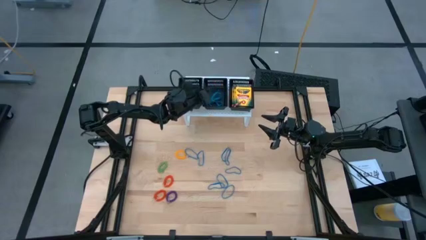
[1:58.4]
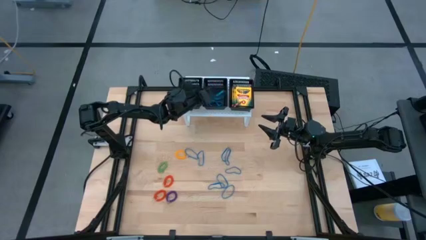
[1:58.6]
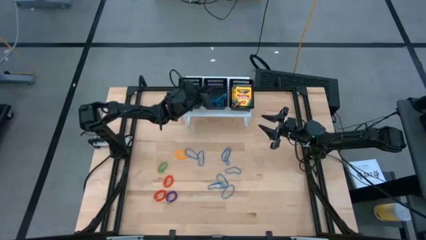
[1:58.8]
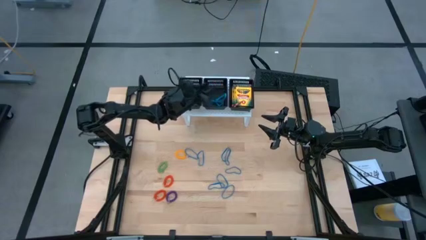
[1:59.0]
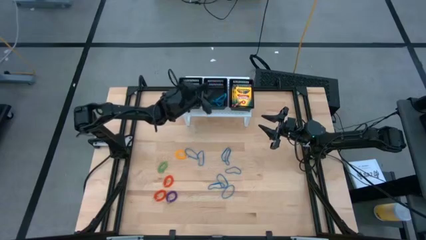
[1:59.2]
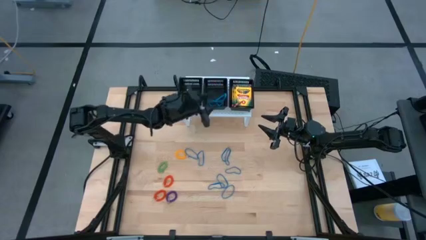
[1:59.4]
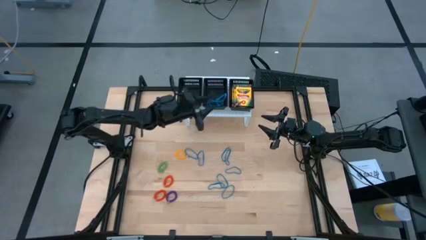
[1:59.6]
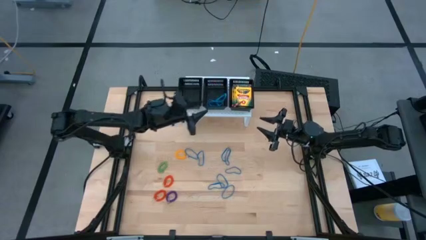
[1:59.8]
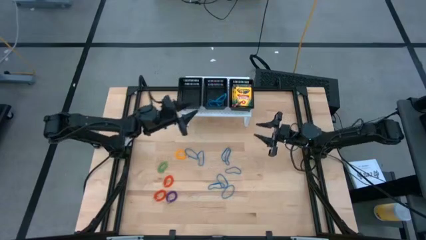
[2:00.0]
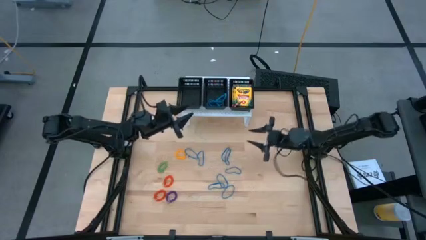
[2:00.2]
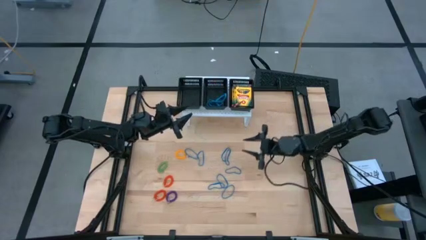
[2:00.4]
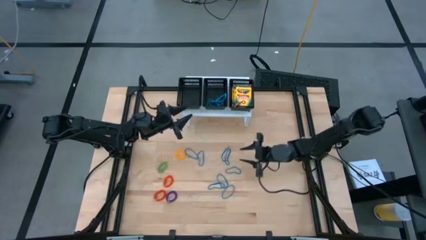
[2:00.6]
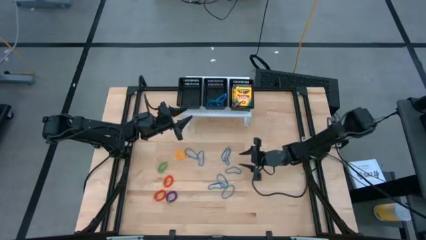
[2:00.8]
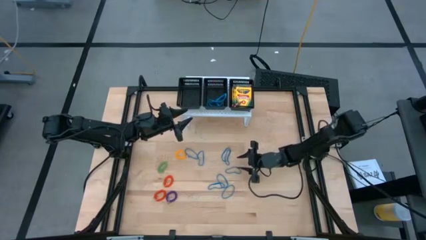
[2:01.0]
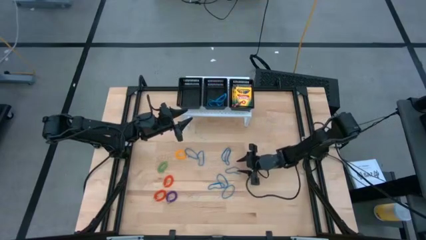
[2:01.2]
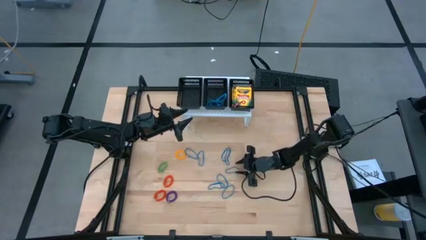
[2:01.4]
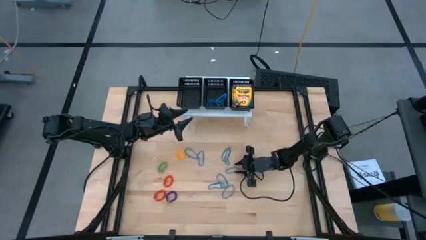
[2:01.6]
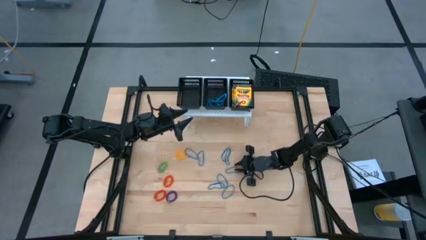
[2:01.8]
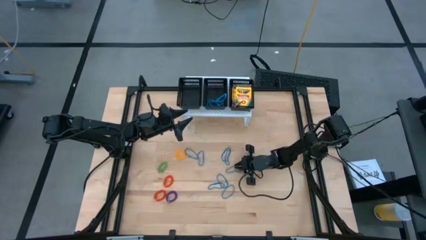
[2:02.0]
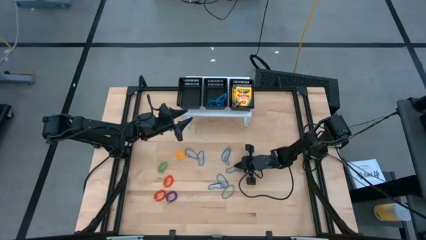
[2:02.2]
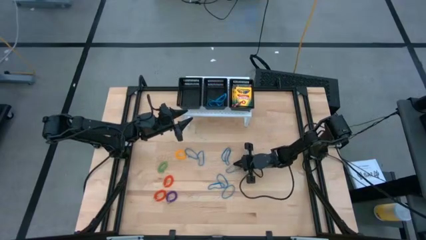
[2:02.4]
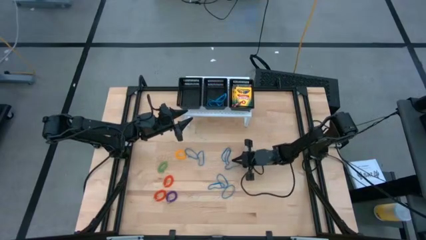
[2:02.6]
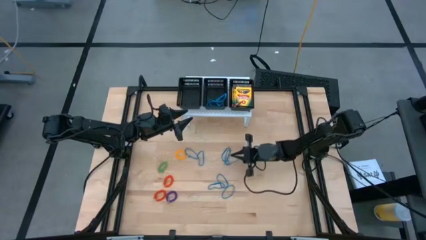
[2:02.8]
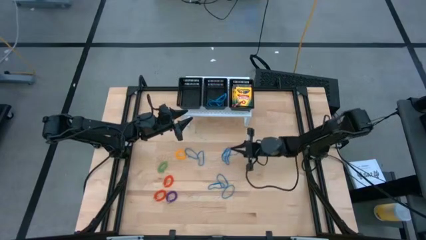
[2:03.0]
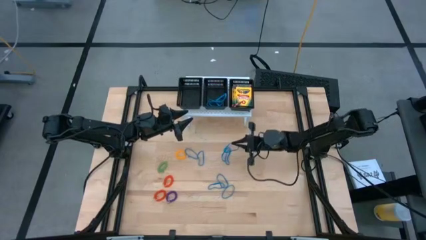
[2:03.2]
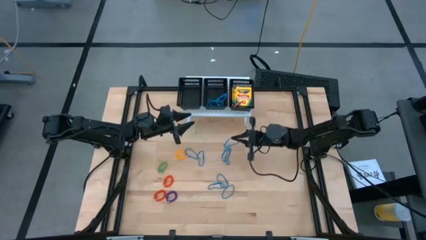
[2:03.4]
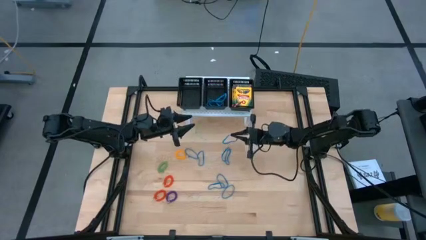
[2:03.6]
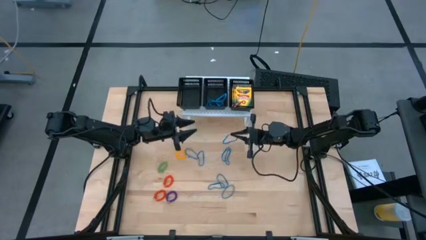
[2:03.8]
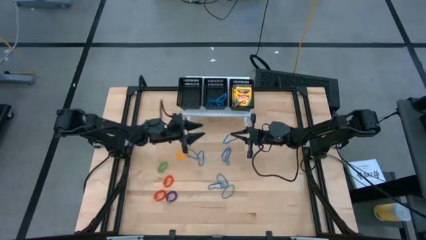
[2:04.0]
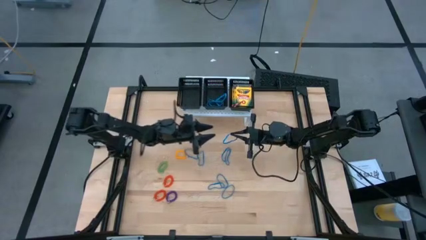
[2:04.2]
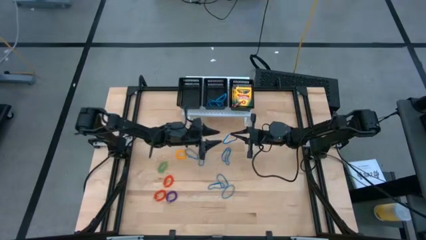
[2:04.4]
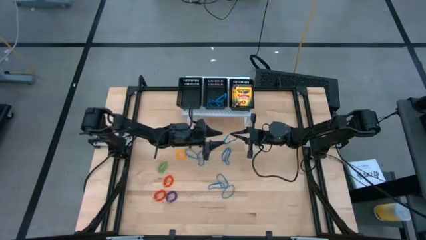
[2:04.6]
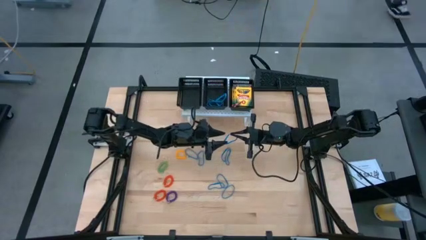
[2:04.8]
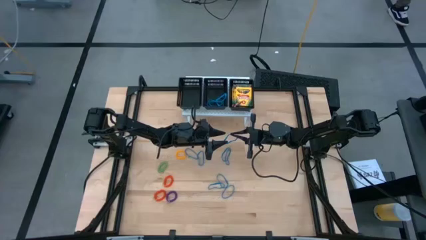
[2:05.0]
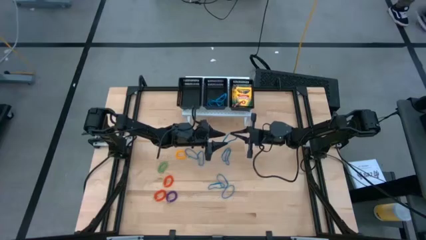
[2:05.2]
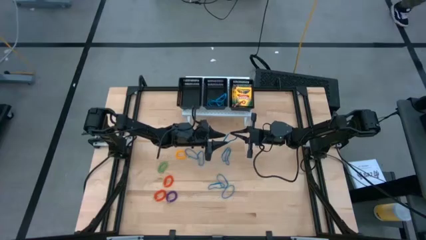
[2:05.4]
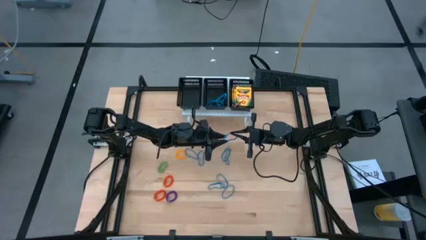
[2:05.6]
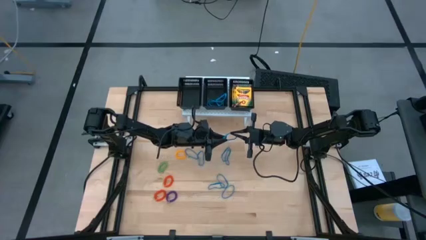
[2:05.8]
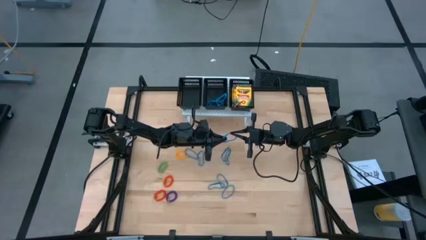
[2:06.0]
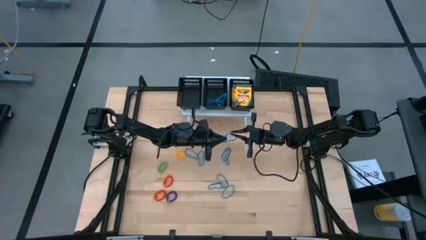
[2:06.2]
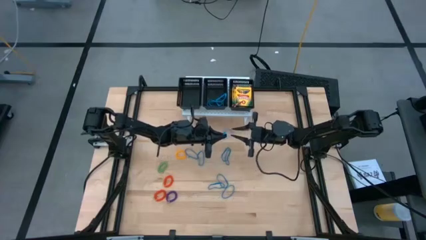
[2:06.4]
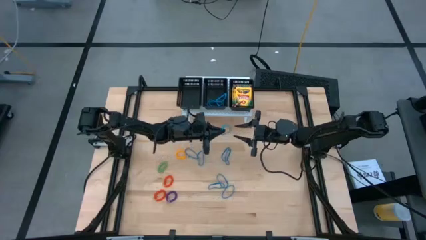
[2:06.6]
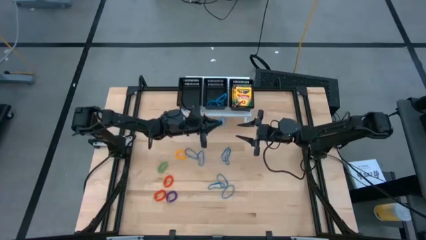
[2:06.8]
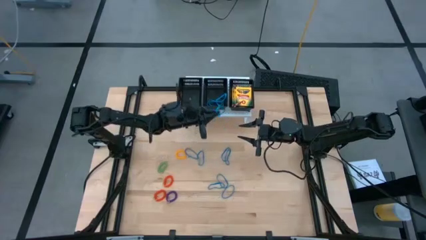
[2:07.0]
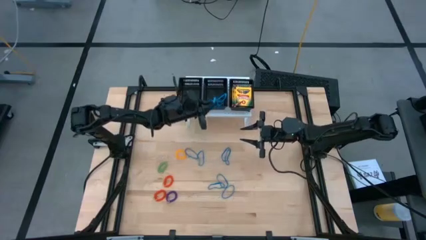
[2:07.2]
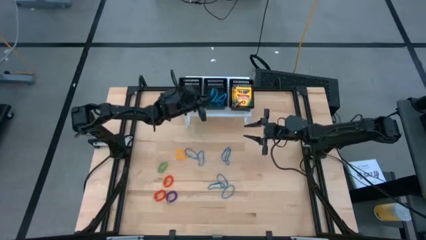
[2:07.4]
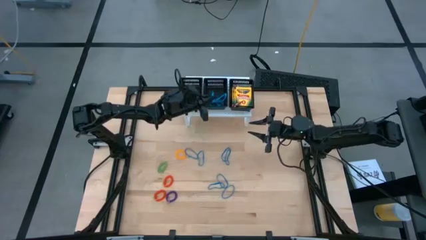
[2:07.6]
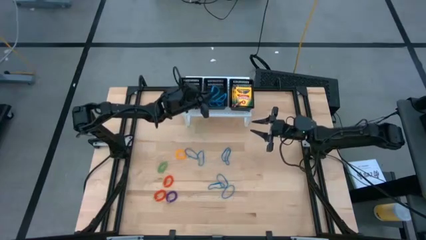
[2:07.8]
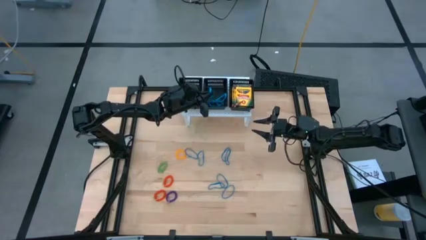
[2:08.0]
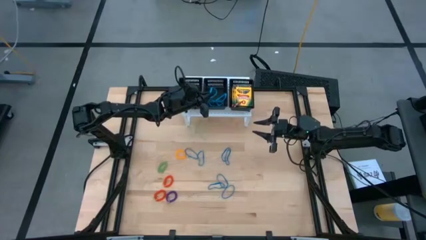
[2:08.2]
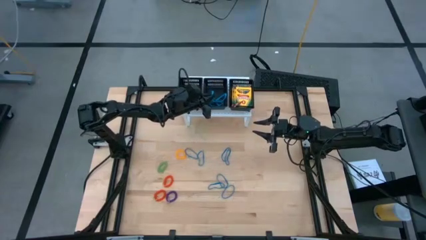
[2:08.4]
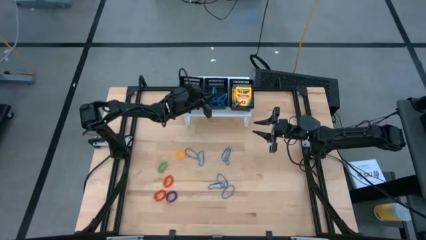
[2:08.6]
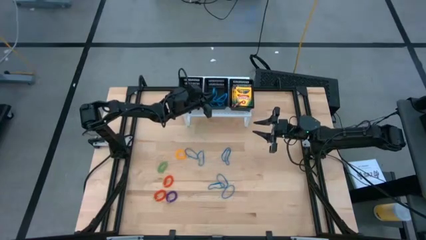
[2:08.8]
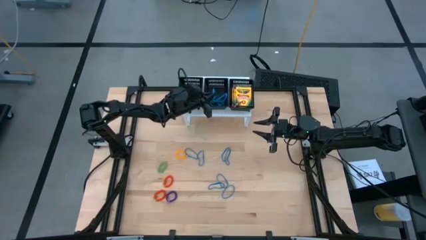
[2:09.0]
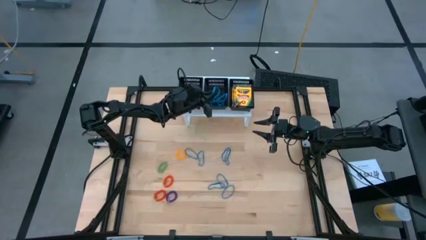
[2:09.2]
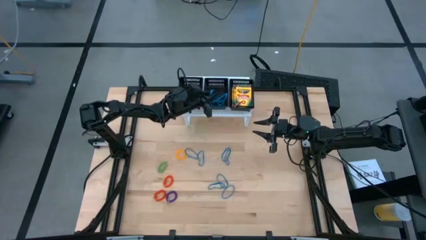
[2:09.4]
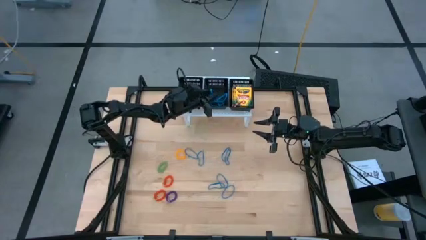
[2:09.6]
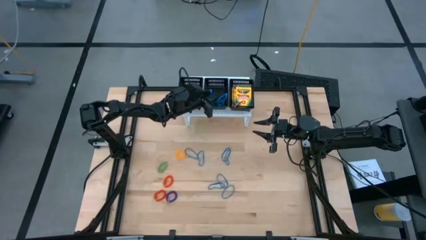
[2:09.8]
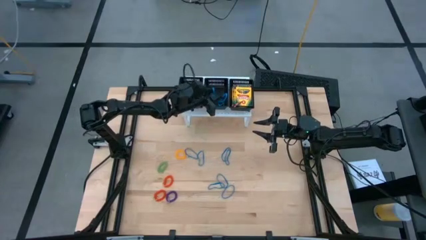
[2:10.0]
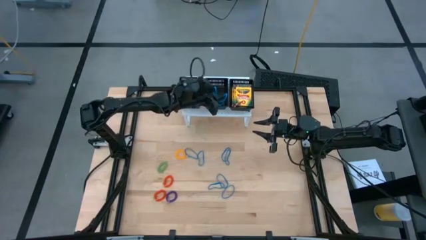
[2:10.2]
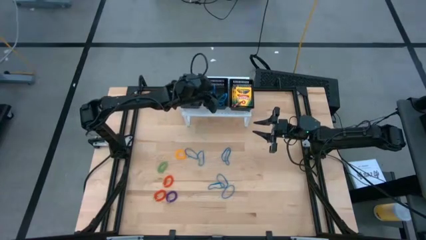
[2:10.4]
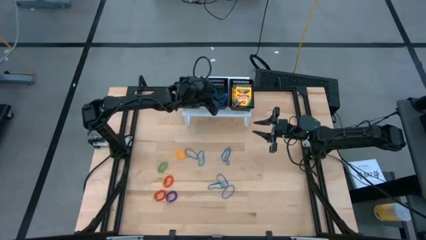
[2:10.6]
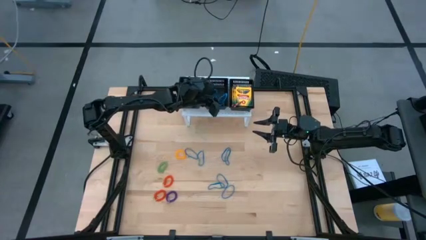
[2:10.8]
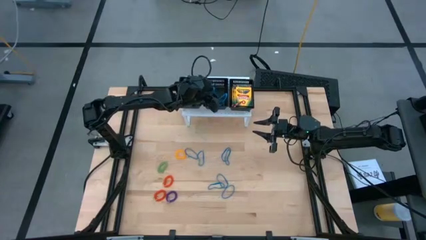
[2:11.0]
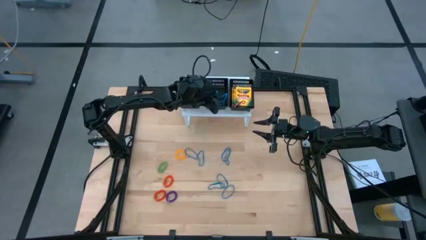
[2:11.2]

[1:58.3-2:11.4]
Task: Pick & Place Office Desk Supplies
Put the blue rubber band into the middle black bin
